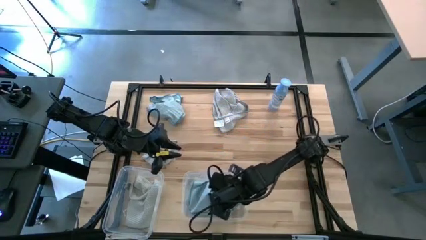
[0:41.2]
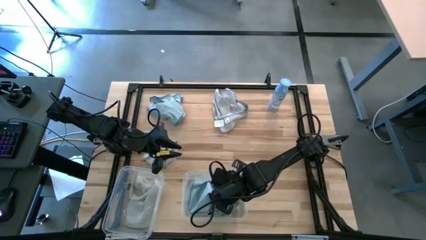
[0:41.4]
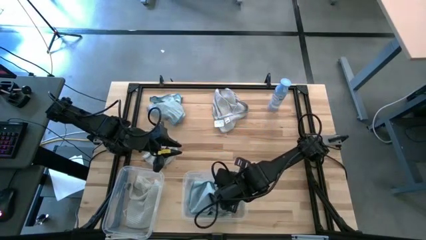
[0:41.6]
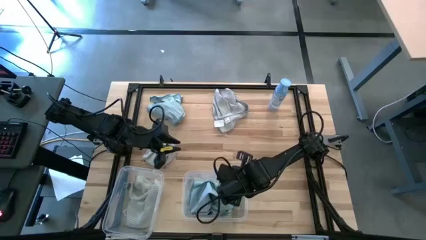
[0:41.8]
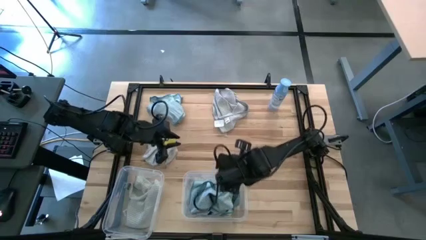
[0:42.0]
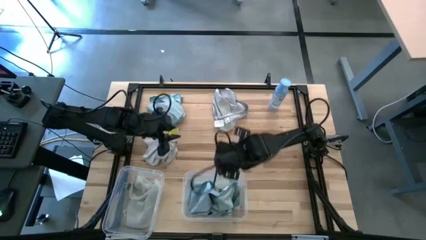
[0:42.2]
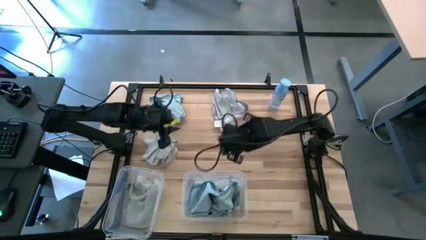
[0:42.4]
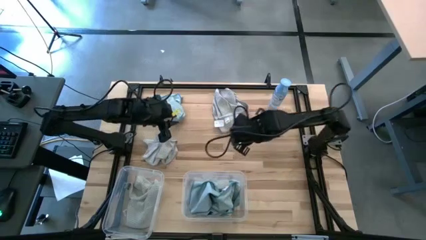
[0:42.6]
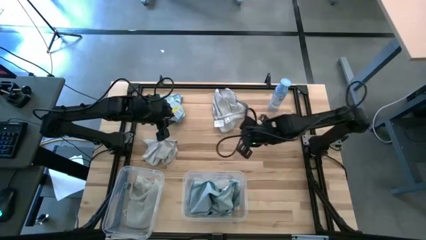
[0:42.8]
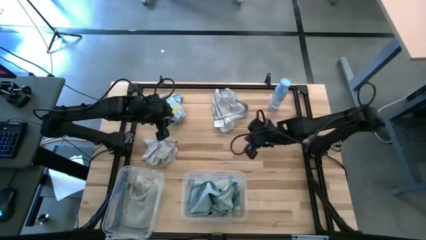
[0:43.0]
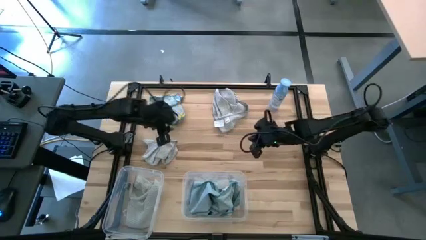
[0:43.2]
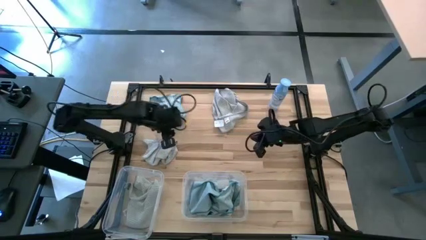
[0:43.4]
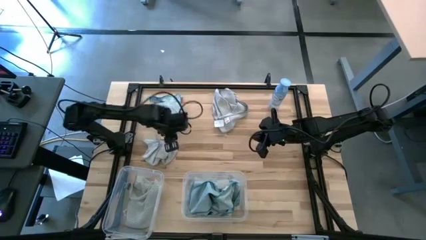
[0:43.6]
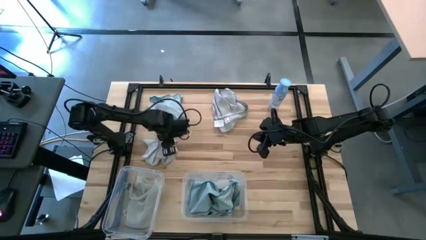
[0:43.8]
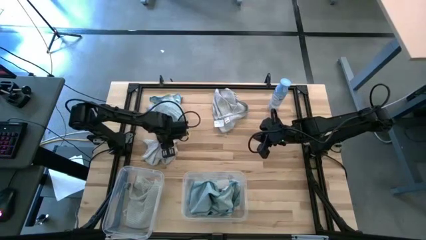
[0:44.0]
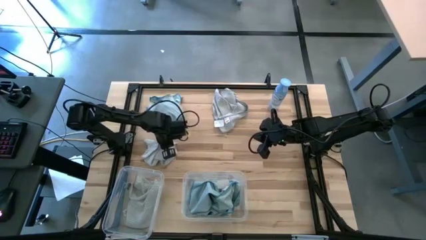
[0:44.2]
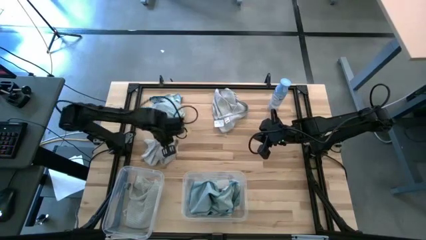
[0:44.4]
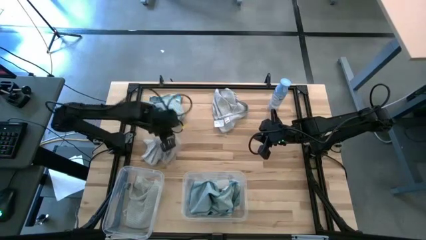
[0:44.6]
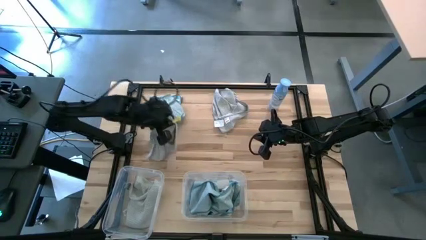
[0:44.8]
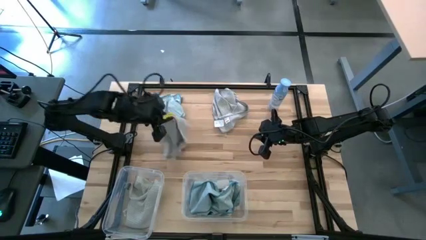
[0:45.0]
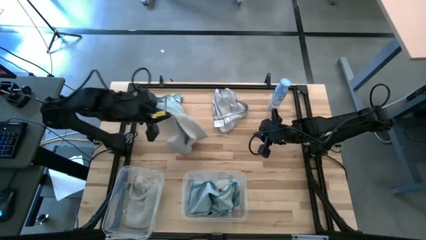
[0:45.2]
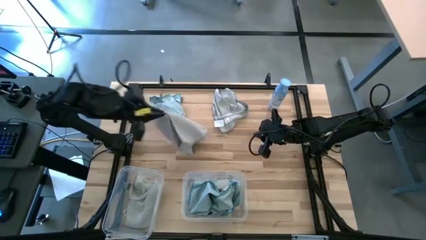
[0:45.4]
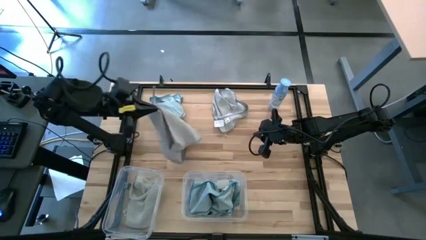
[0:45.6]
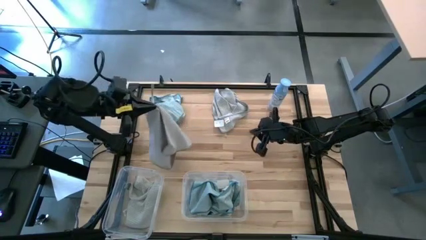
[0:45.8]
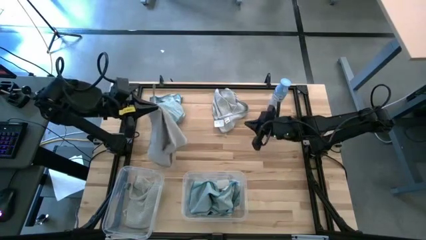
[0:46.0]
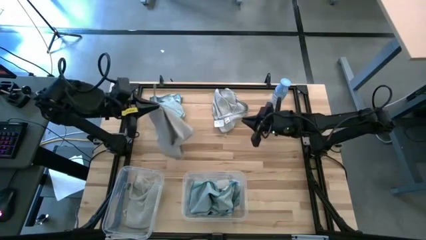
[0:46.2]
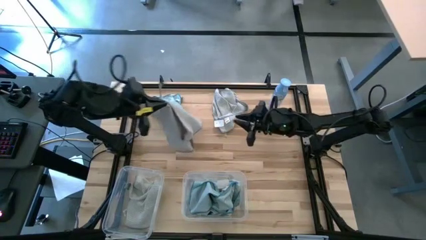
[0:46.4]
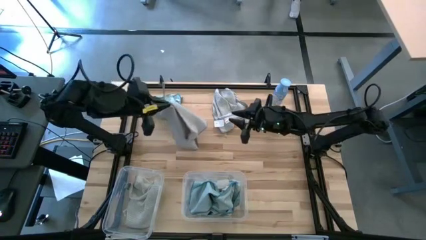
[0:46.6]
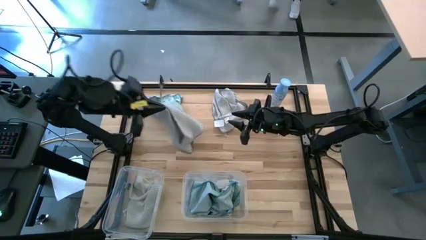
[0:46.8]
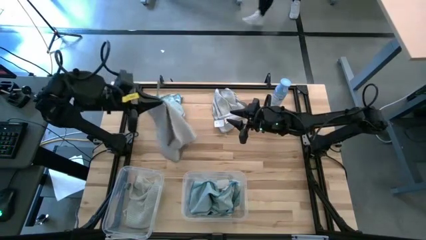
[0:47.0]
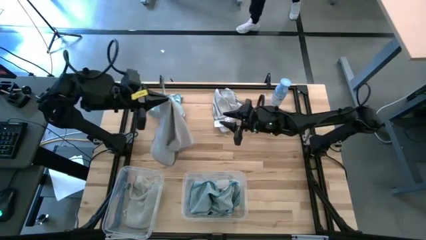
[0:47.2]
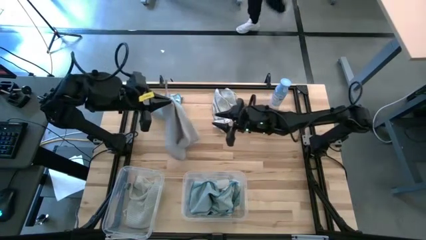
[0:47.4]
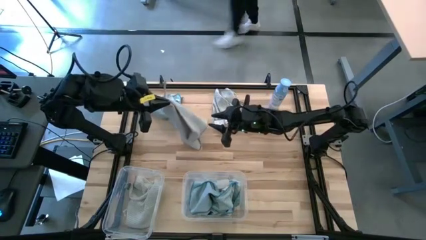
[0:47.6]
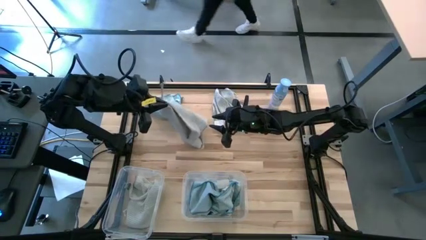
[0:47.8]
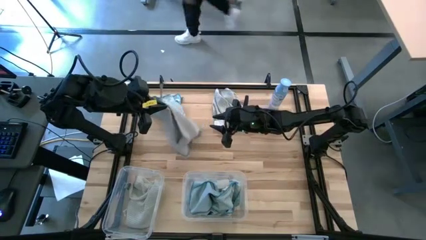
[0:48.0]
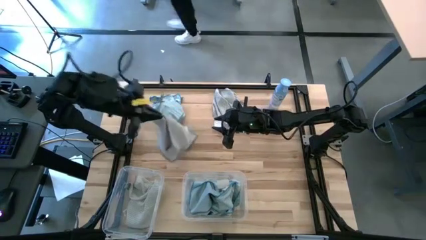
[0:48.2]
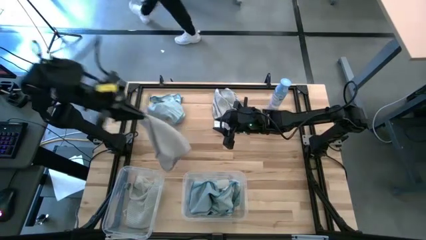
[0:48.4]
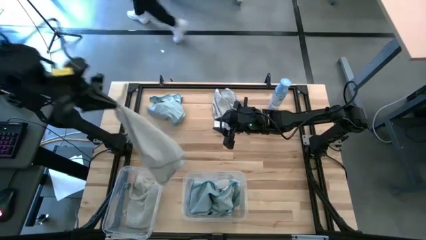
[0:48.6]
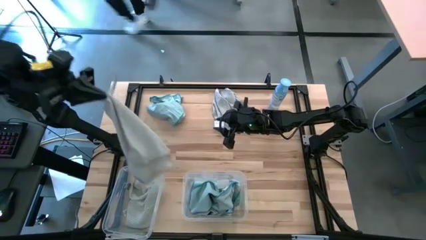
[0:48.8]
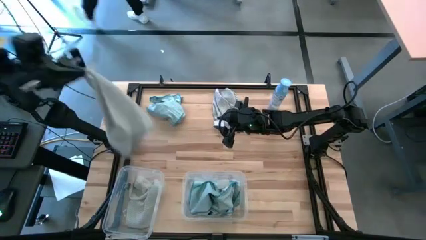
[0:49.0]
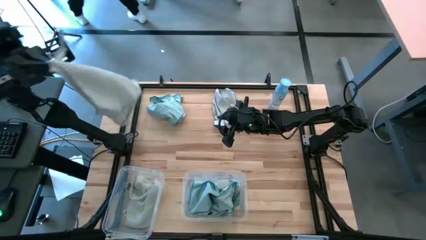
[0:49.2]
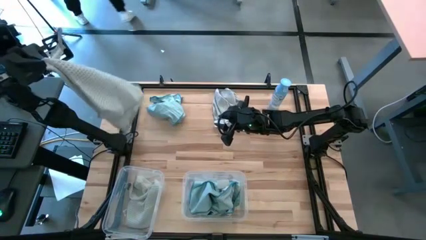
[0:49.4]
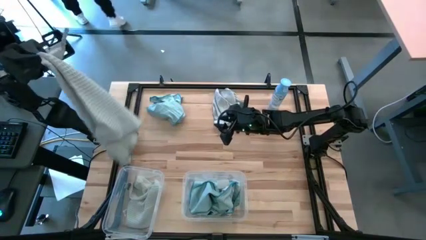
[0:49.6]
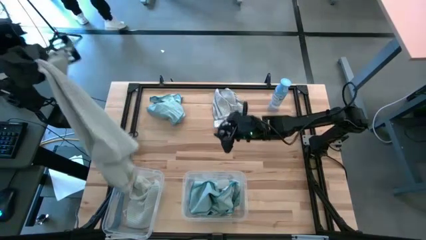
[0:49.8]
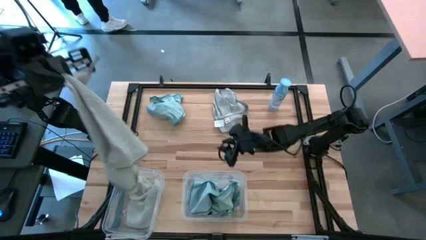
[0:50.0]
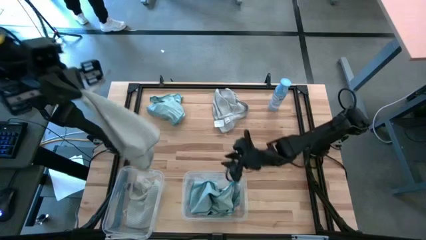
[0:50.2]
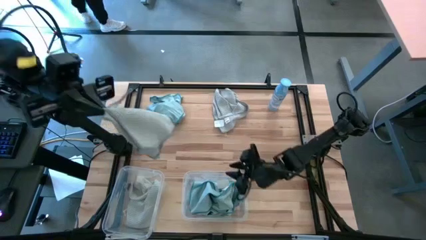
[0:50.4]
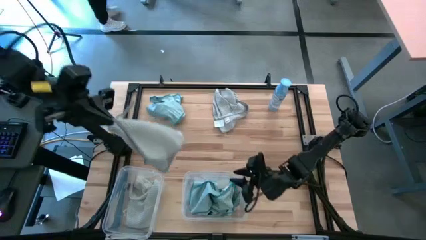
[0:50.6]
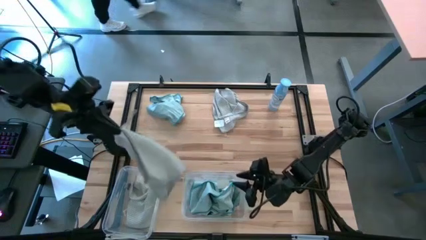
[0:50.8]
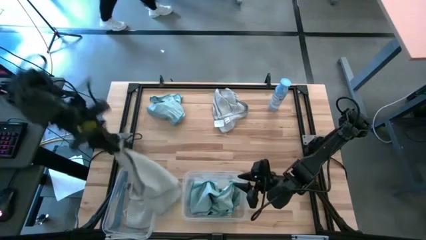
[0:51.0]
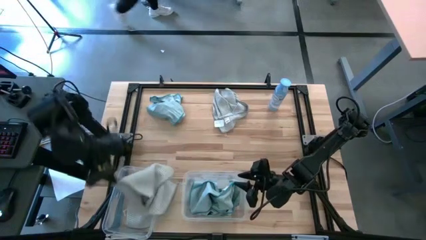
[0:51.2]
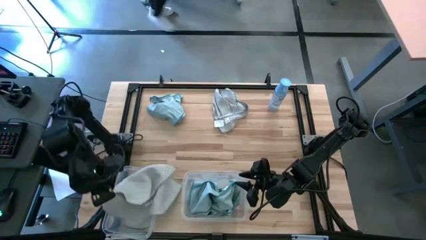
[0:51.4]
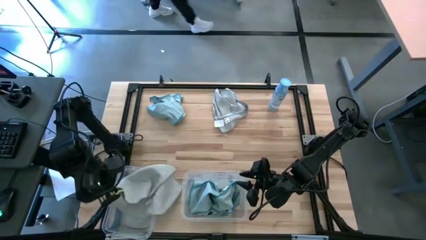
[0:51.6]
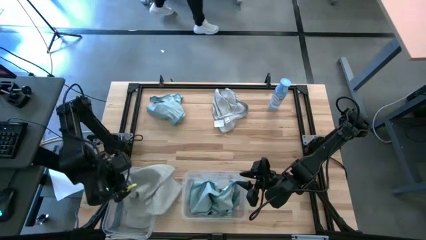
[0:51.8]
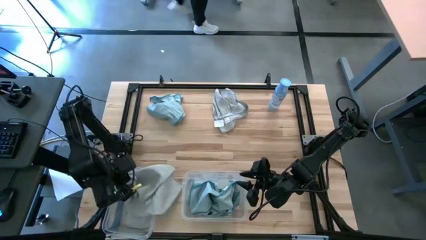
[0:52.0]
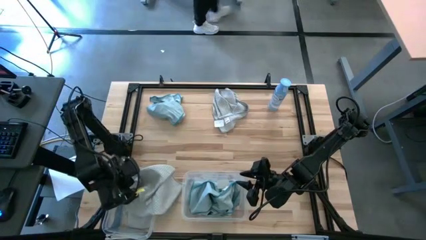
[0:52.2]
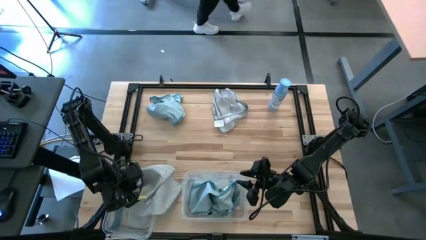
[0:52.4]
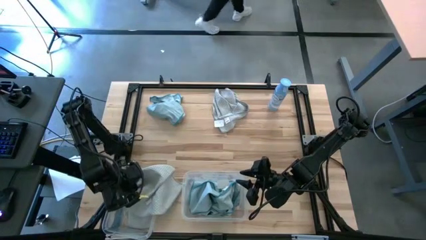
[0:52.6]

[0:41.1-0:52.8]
Task: Sort microfiber towel by color & place in baskets
Put the bottom left grey towel into the left transparent bin

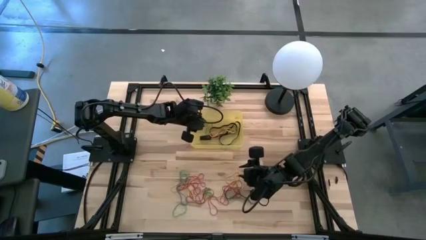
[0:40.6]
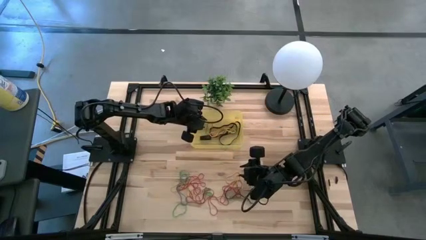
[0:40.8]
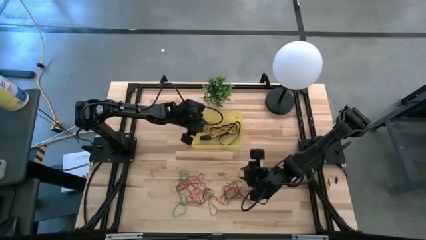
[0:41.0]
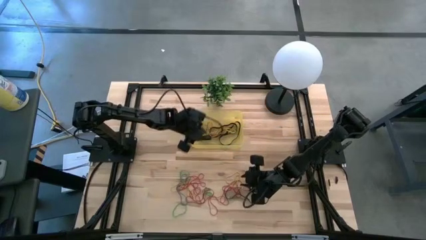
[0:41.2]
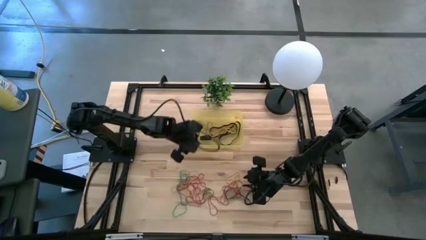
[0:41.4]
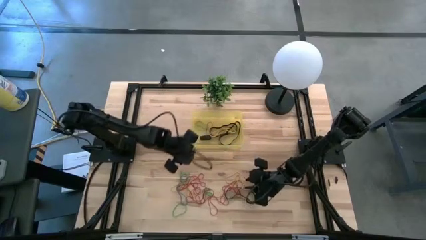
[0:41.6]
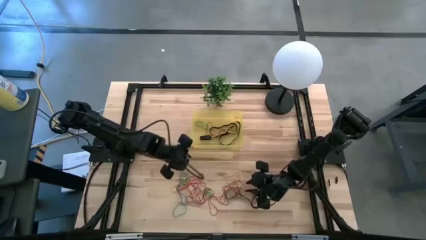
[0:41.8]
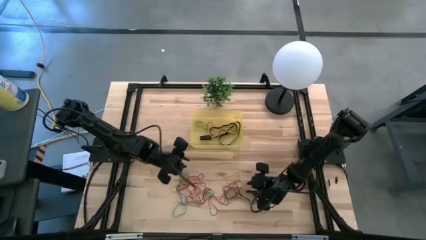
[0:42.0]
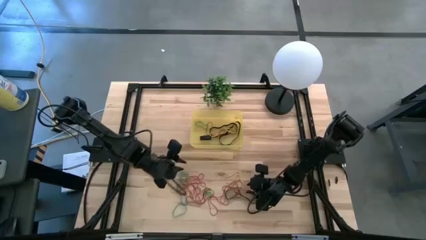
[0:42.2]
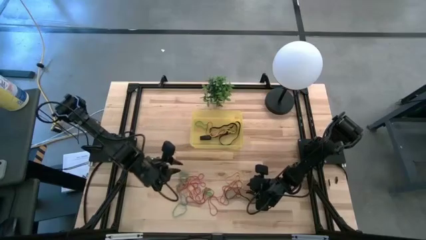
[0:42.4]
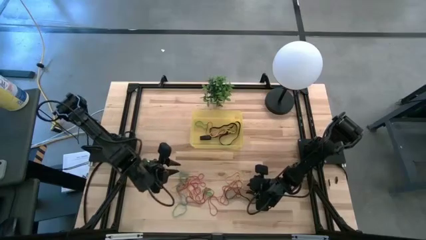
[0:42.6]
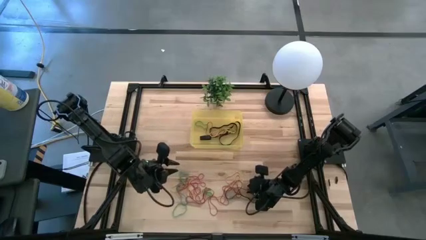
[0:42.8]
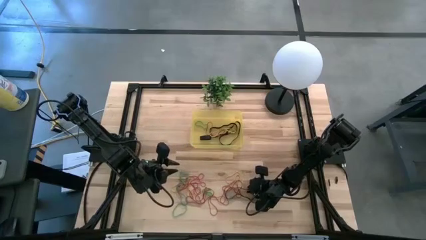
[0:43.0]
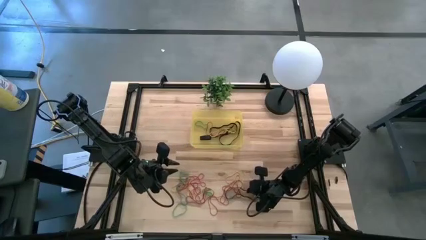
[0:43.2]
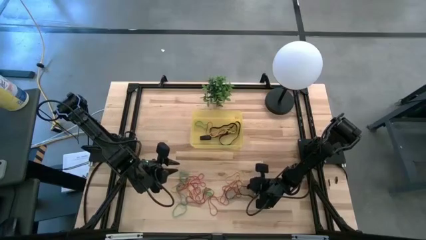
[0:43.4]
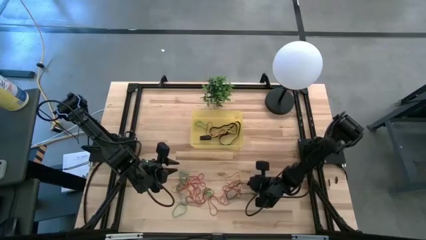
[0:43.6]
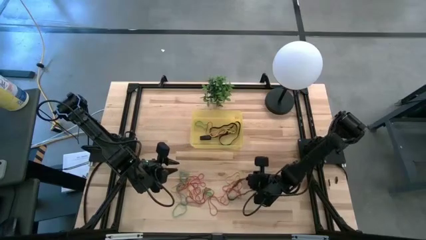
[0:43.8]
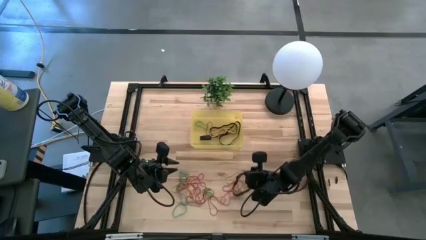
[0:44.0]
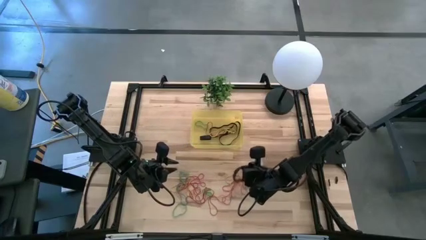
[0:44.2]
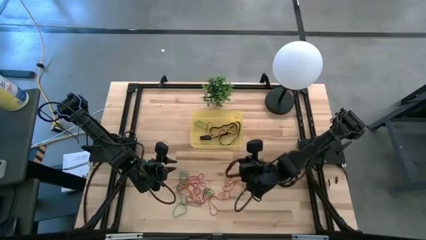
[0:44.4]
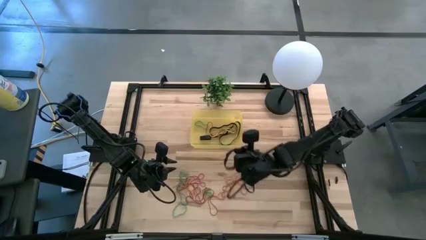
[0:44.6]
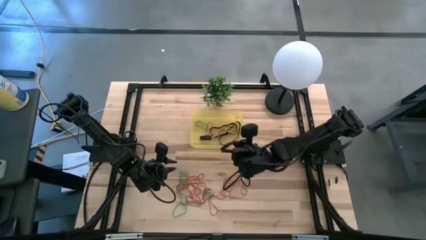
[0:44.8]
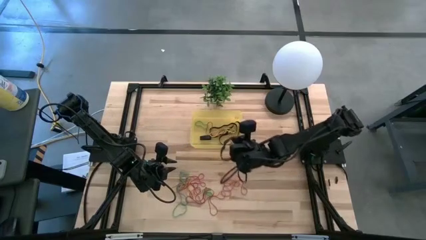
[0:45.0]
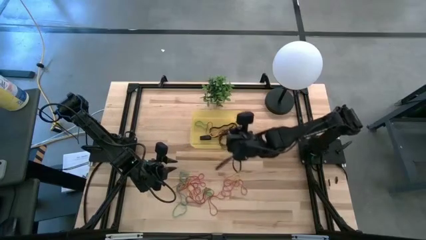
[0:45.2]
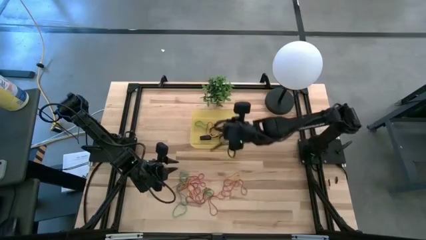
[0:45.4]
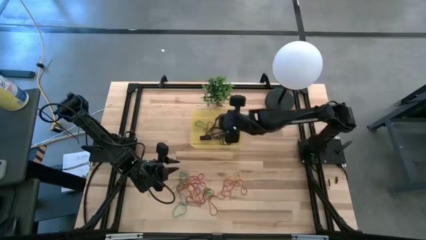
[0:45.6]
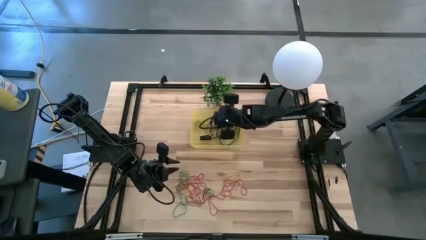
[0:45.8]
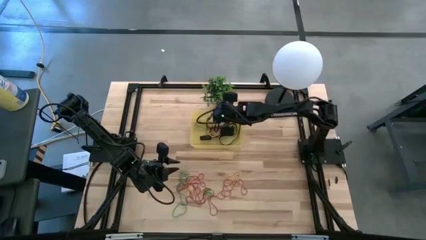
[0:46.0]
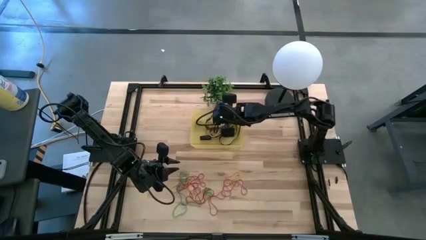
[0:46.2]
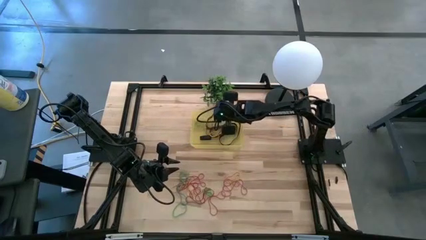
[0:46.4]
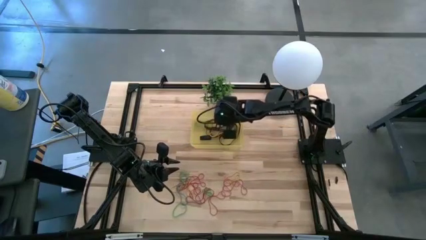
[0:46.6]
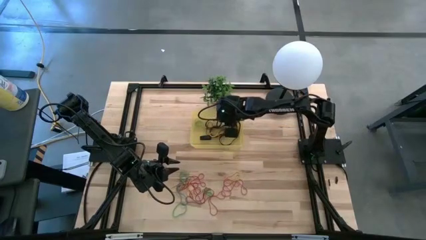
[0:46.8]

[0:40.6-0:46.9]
Task: Pick and place rubber bands into bin
Put the black rubber band into the yellow bin
